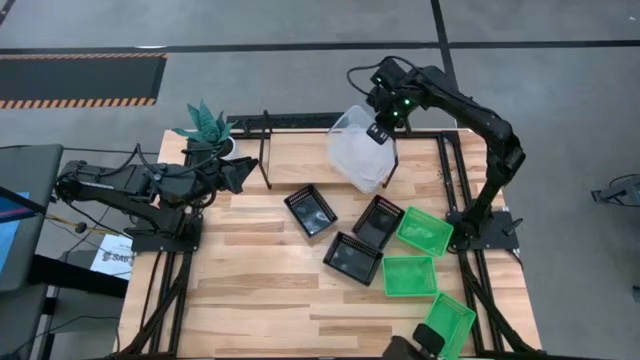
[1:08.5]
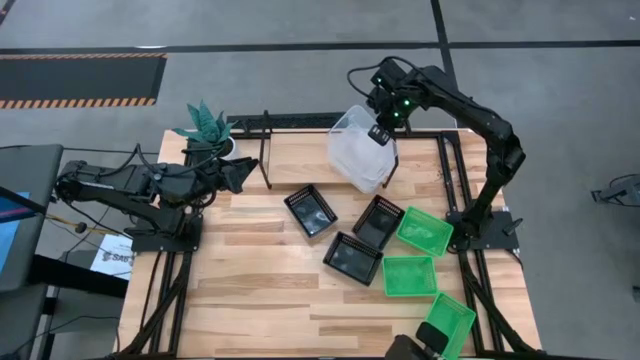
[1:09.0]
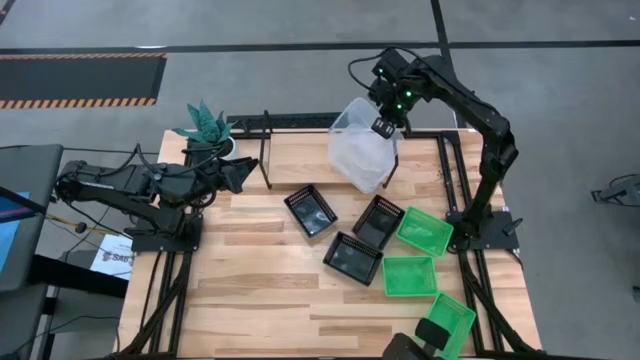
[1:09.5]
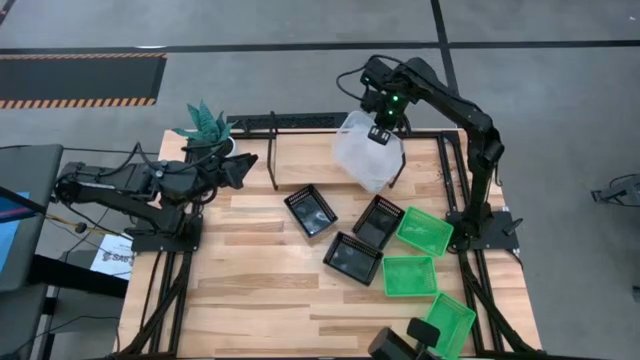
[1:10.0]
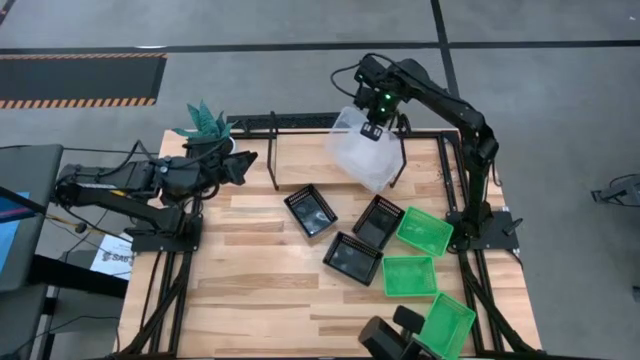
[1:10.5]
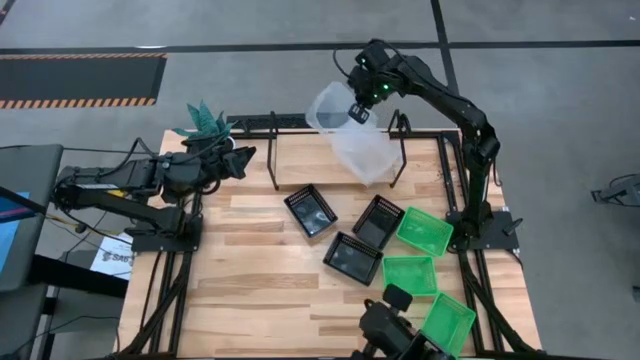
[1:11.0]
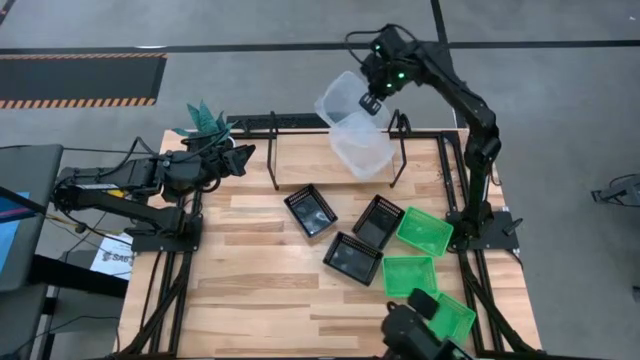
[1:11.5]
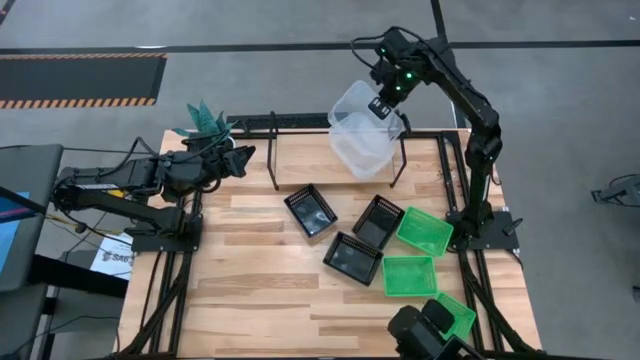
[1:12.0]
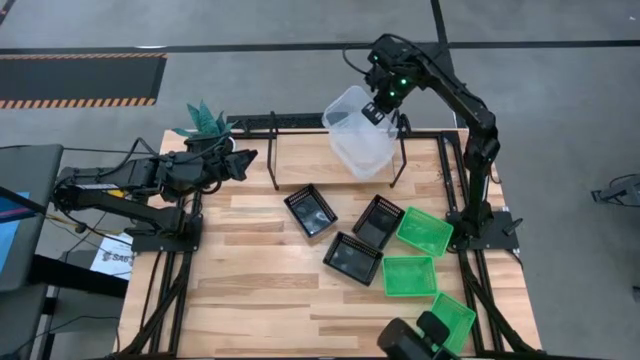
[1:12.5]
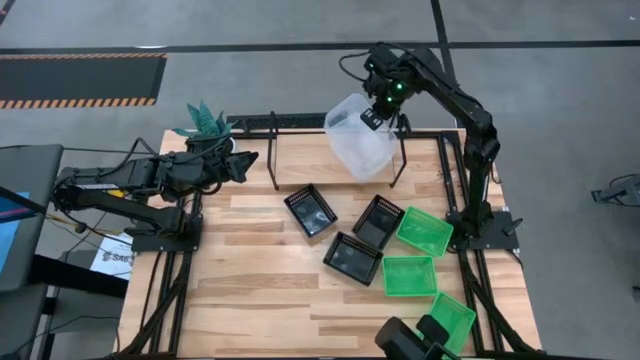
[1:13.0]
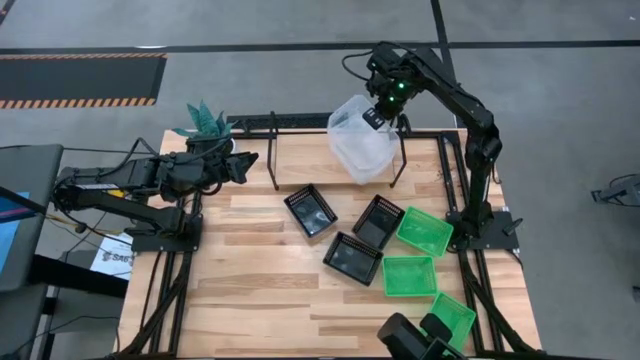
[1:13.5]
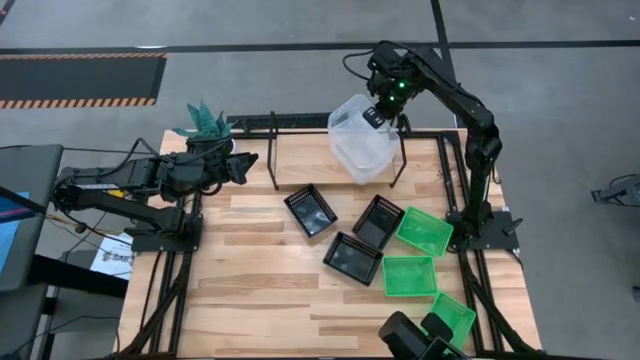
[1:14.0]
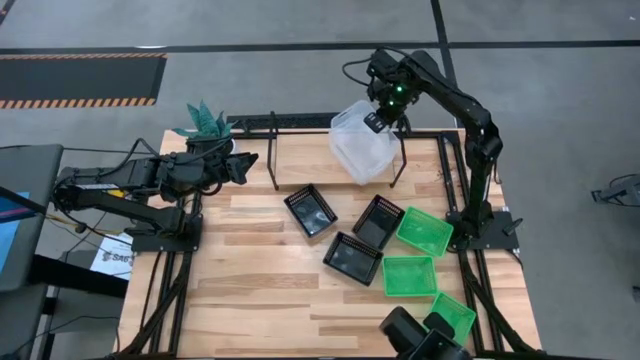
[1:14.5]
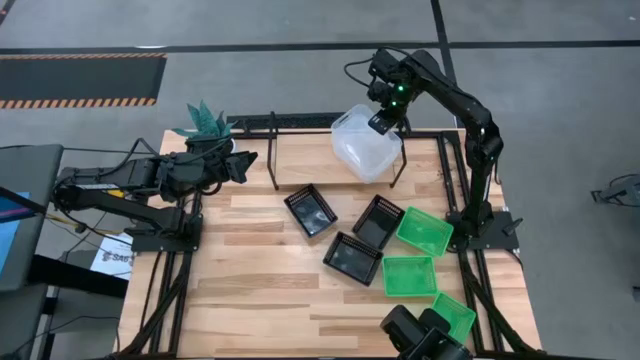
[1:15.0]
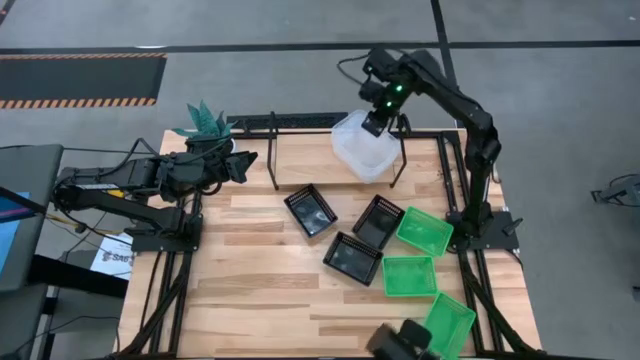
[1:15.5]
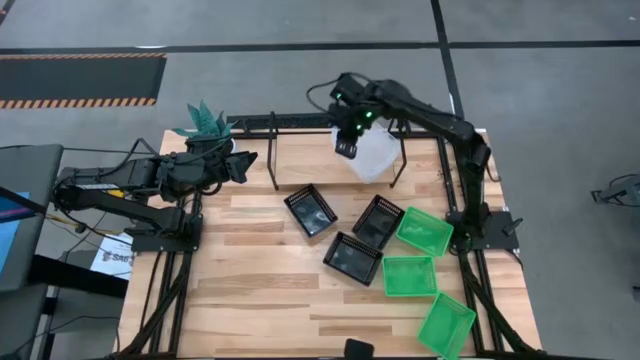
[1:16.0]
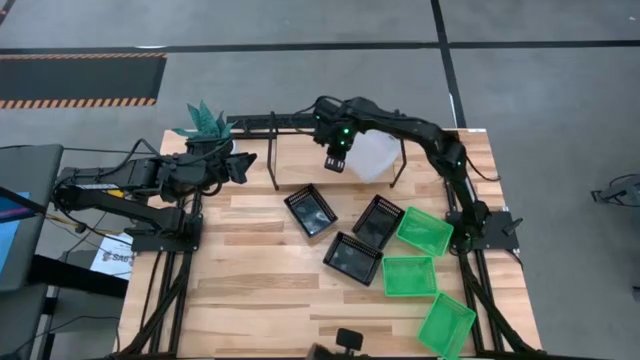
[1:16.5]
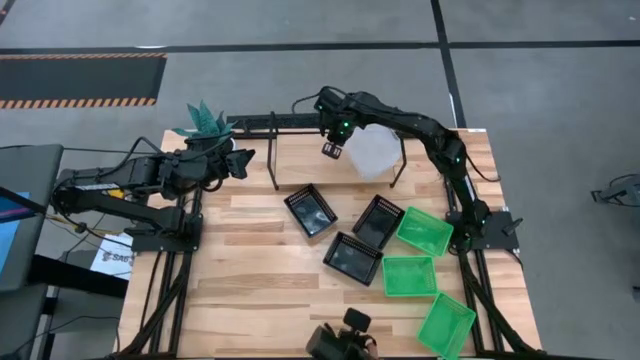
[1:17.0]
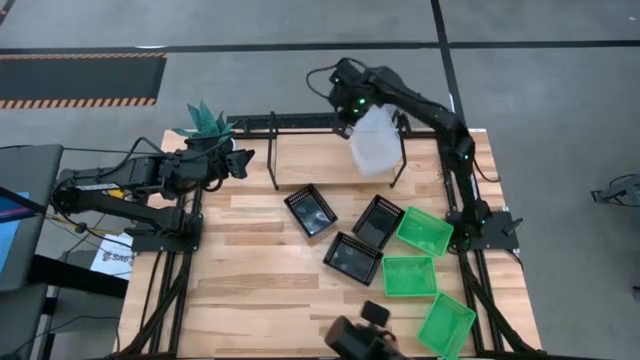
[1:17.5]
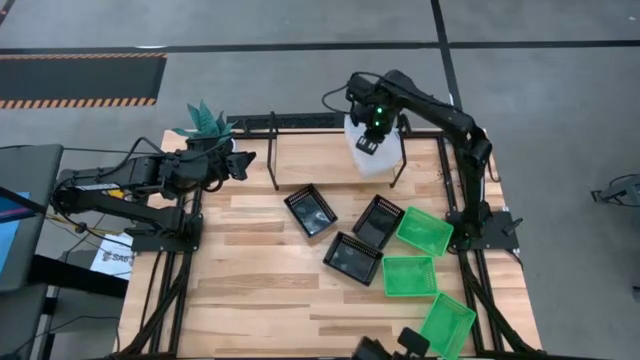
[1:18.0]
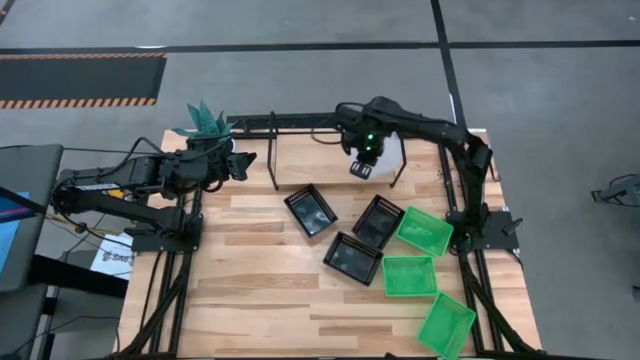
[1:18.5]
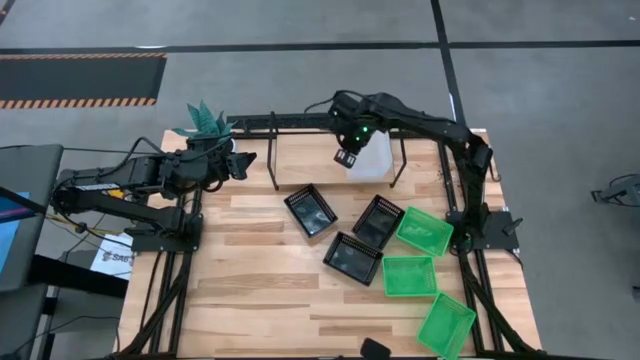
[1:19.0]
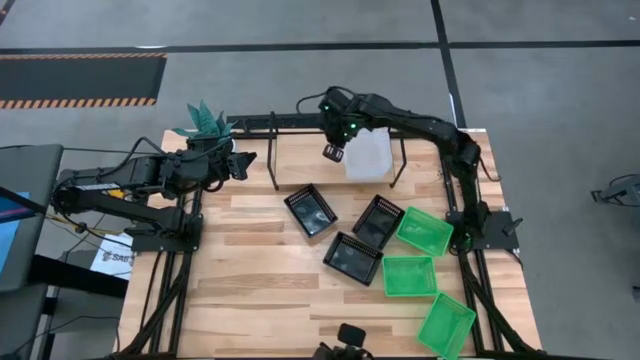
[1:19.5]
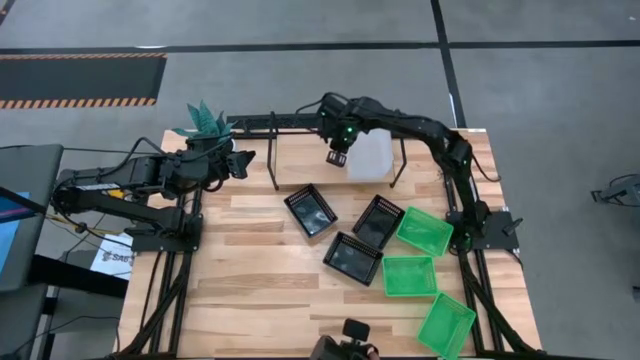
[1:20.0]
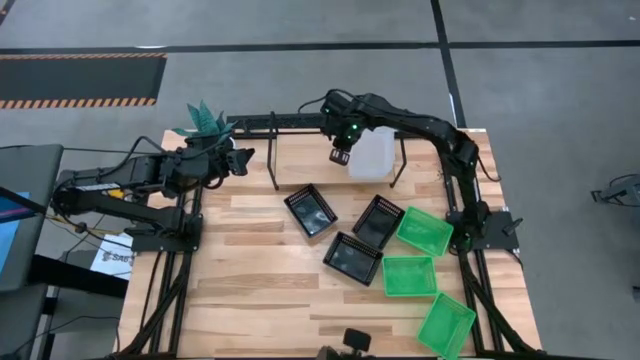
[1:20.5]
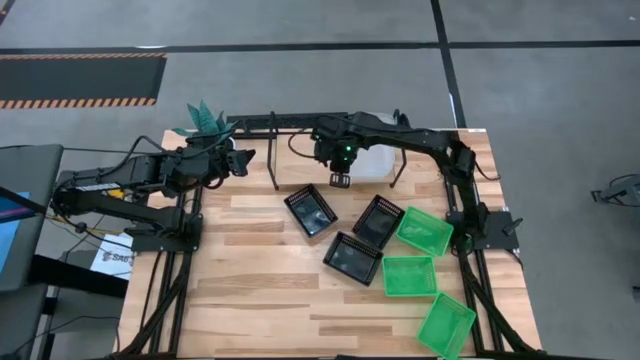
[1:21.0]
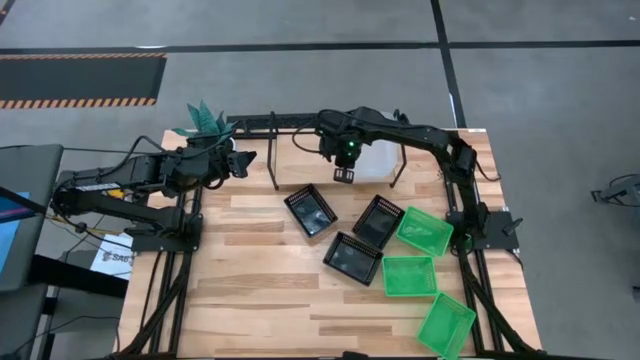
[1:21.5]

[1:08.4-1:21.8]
Task: Stack baskets on shelf by color
Stack the transparent bin on top of the stacked transparent bins on the shelf

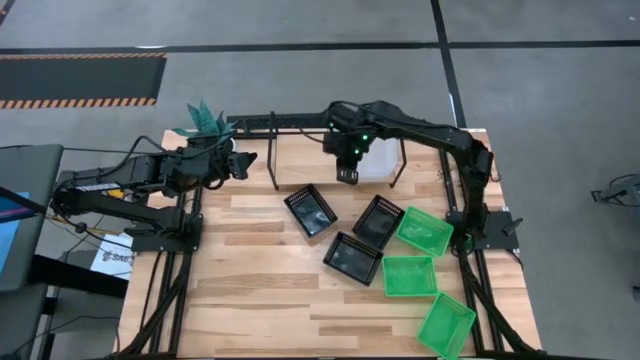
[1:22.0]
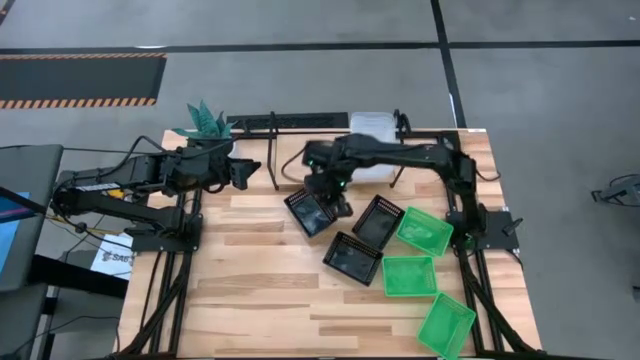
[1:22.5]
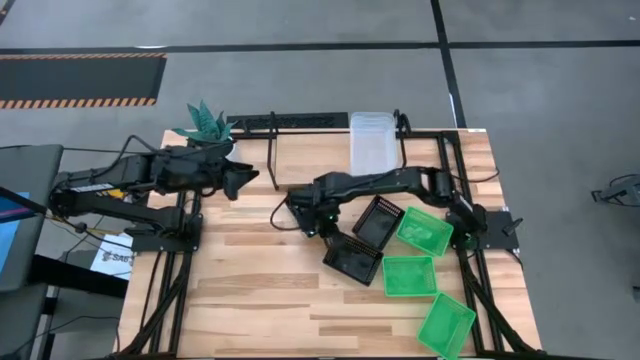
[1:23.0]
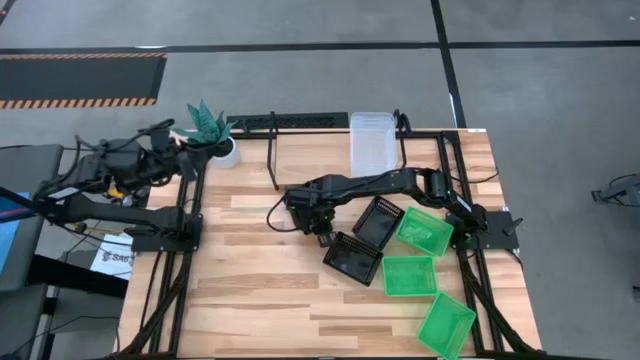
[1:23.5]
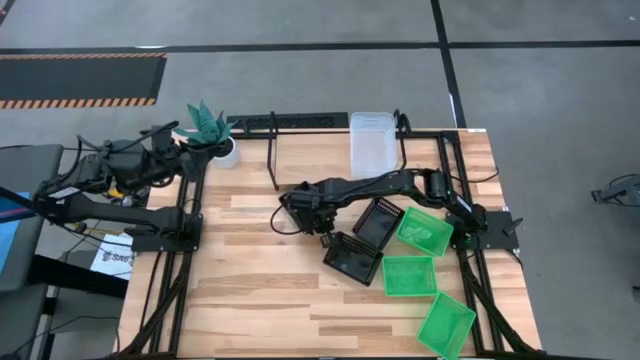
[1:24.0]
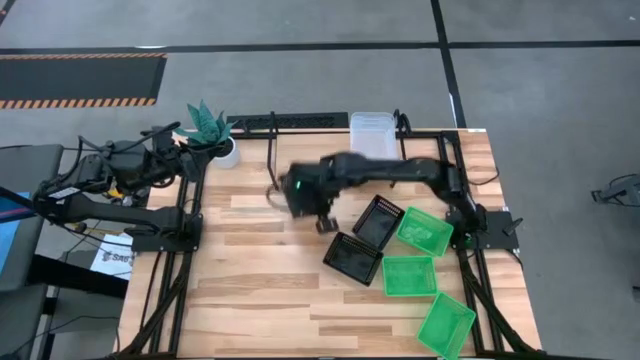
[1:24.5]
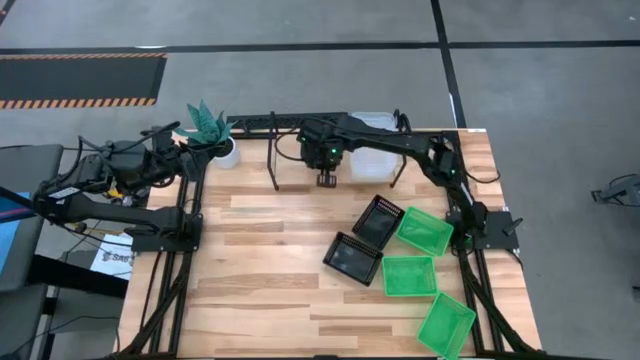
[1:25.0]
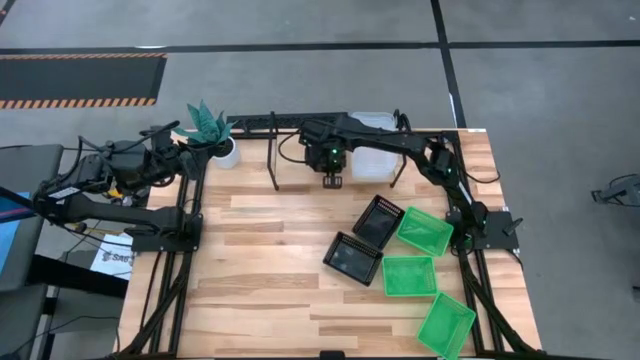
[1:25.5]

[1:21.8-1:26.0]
Put the top left black bin on the shelf

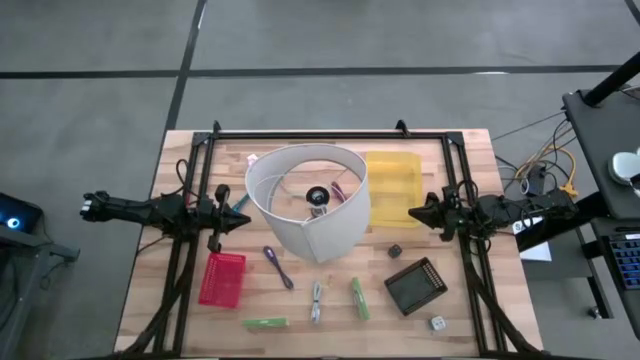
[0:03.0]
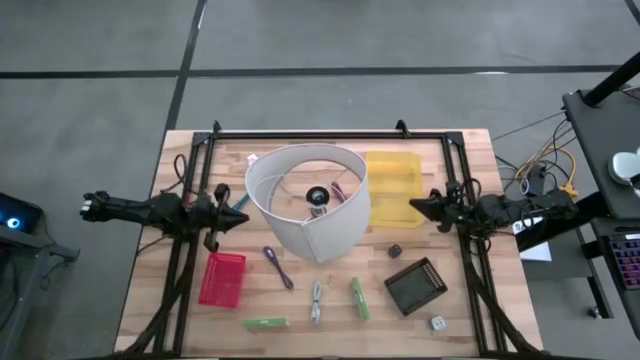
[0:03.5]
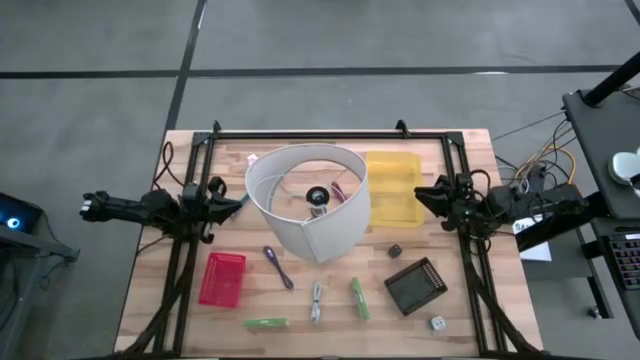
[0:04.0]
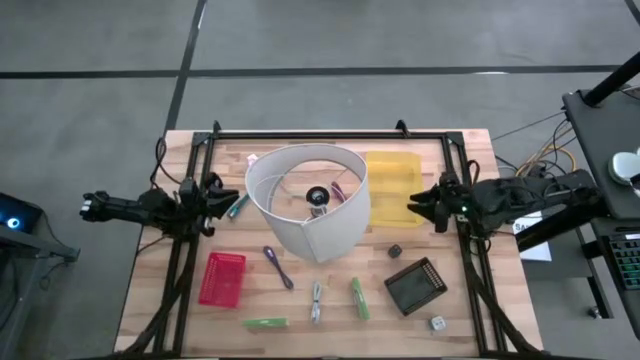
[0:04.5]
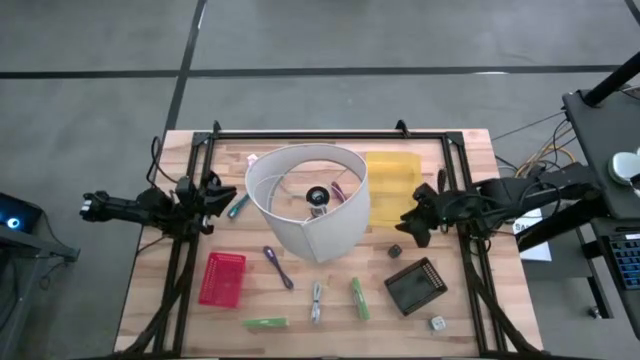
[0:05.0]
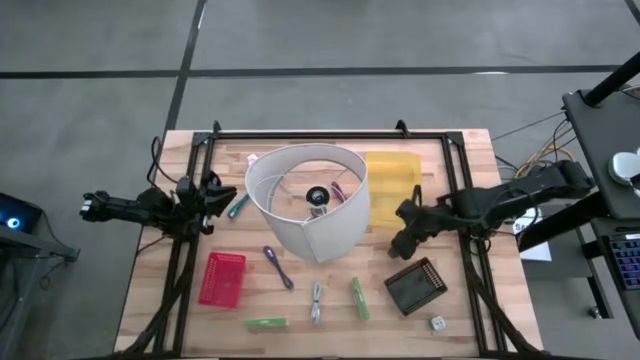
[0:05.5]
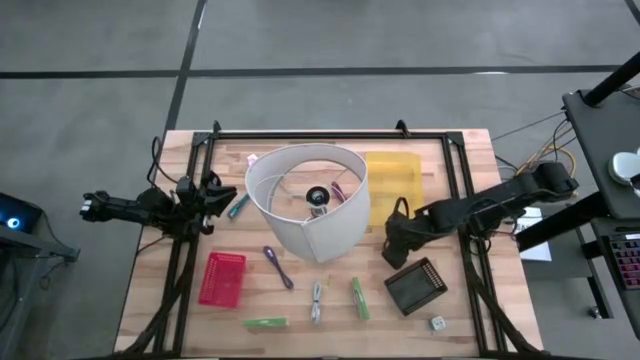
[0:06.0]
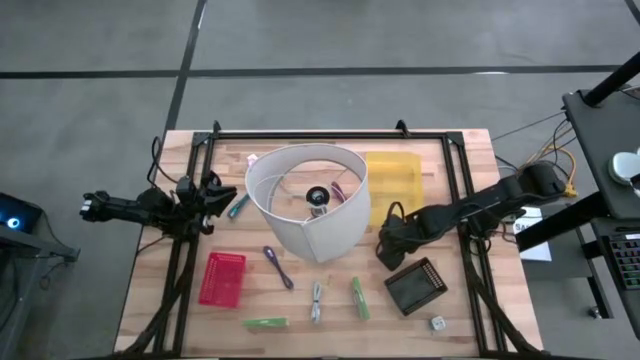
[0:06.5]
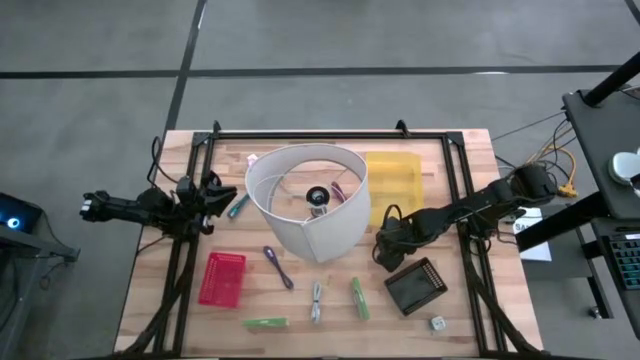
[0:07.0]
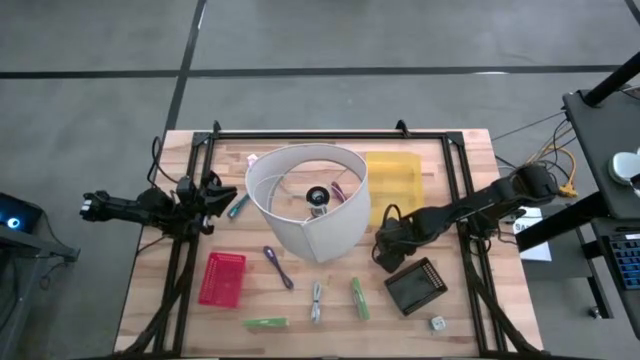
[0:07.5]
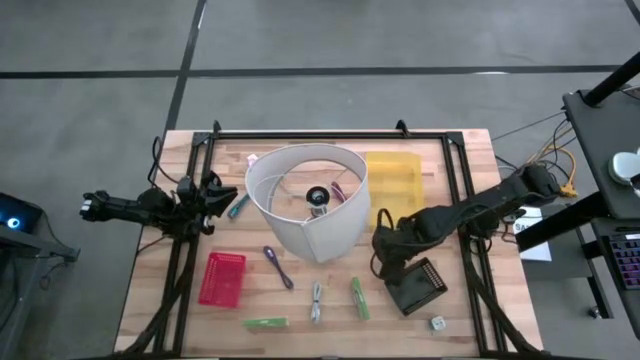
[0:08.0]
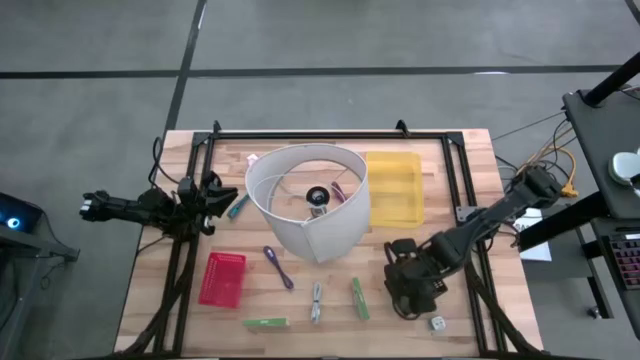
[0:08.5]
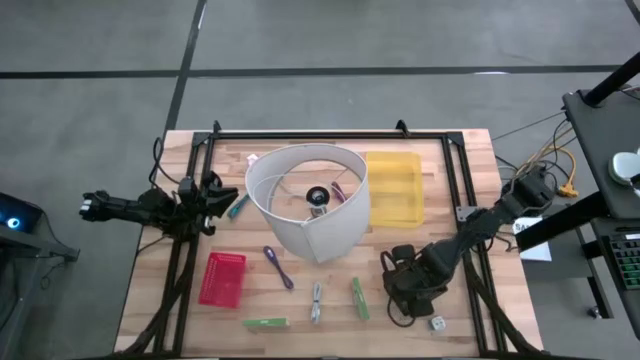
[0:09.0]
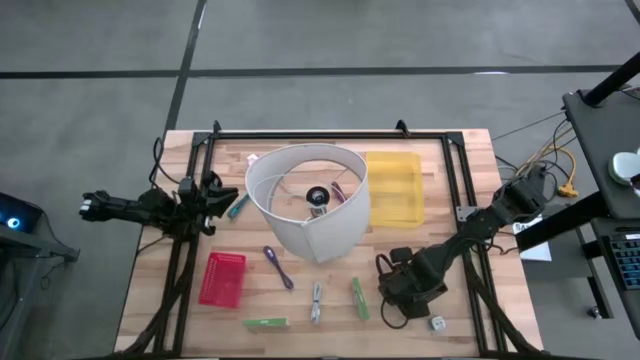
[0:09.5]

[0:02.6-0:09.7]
Task: Pick and place items into bin
Put the black charger adapter into the black bin
